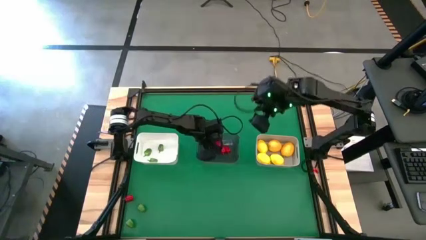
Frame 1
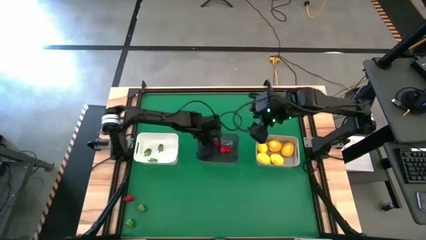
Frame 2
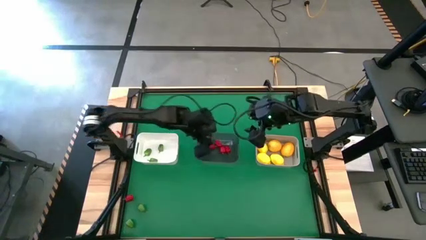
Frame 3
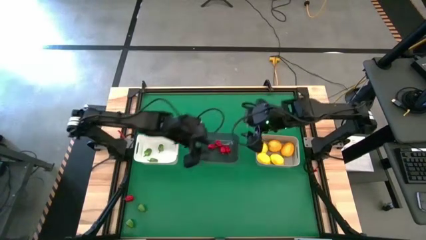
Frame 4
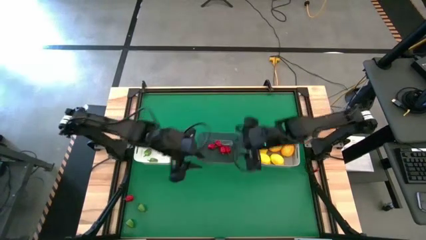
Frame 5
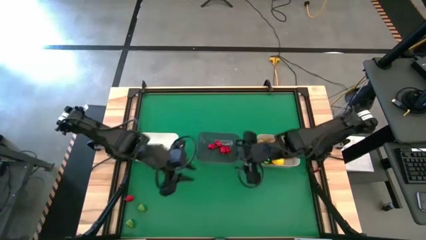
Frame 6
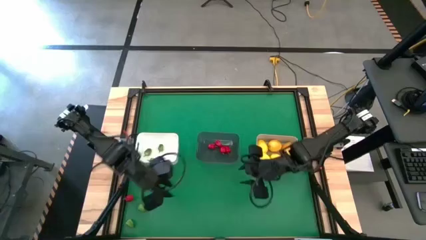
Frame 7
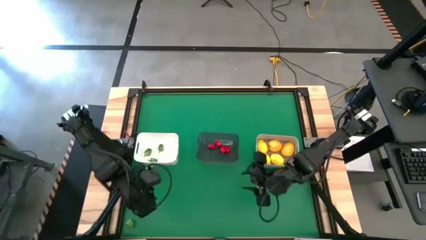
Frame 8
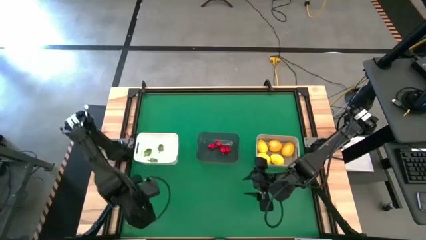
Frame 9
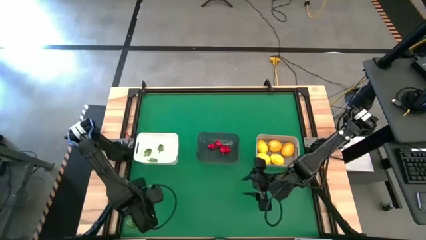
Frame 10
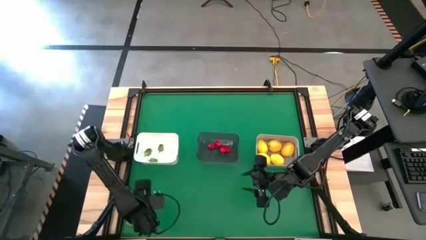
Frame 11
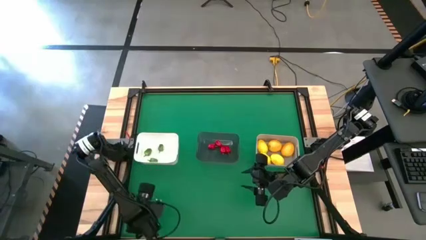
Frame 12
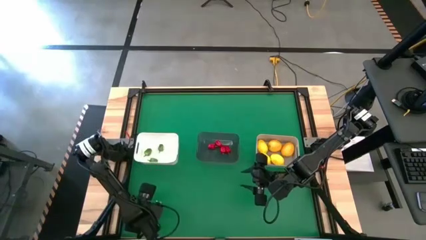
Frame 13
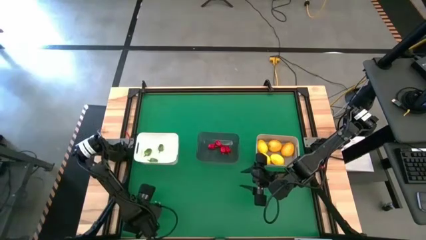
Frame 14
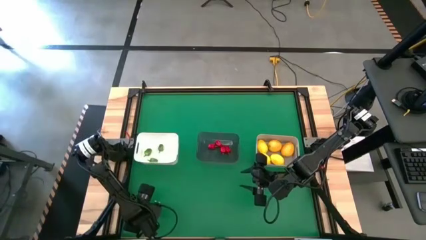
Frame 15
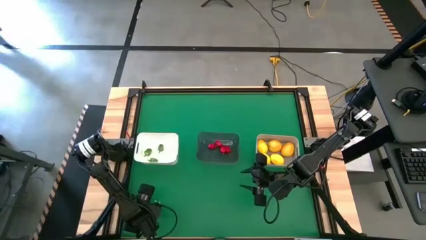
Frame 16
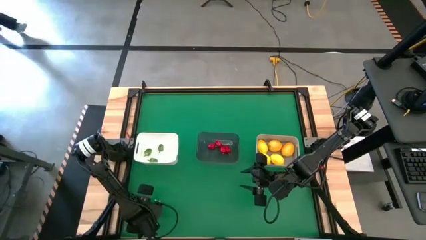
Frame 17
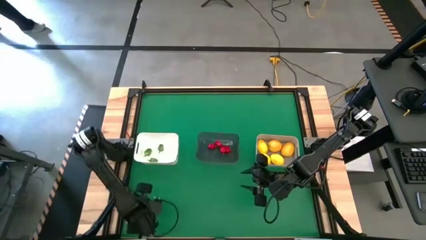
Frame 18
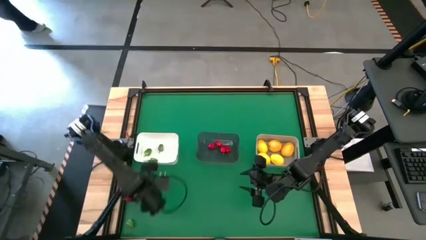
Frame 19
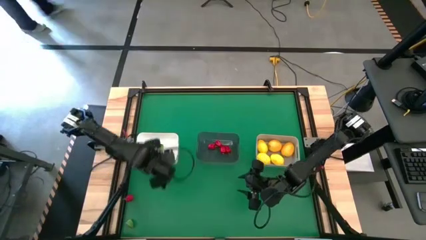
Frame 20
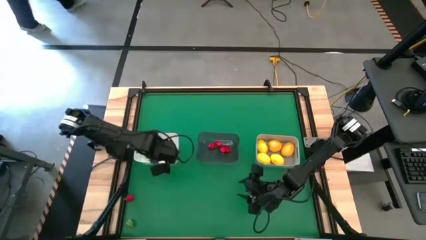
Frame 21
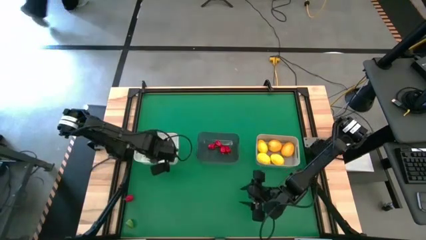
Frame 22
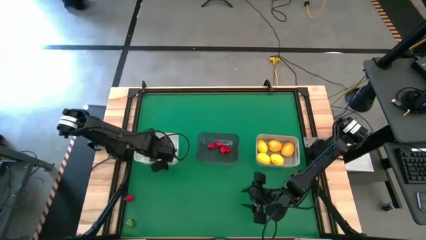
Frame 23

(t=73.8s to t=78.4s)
Task: Sort produce into baskets
Put the green chili pepper into the white bin

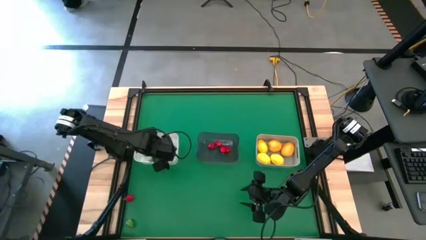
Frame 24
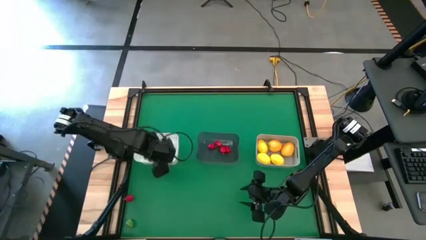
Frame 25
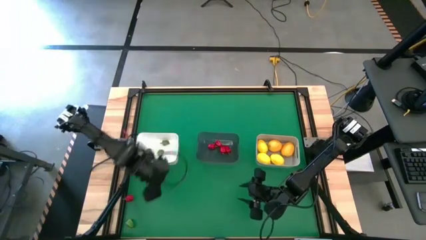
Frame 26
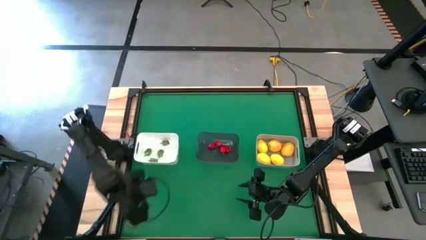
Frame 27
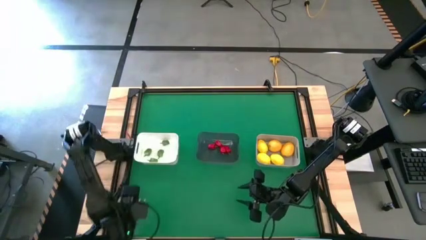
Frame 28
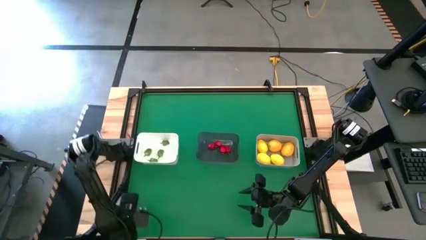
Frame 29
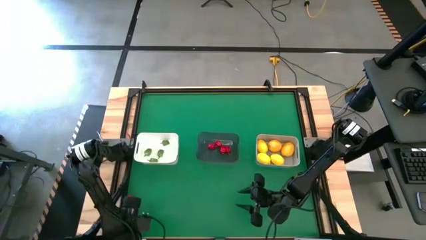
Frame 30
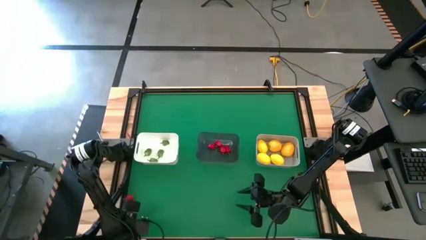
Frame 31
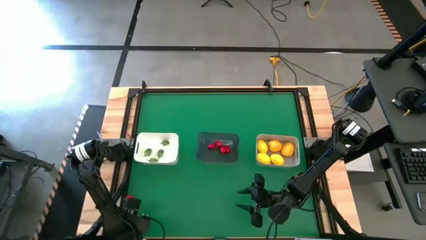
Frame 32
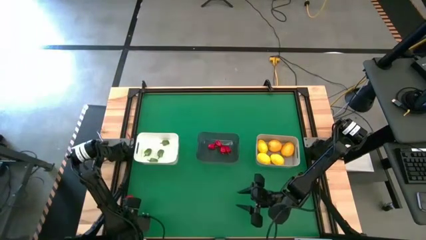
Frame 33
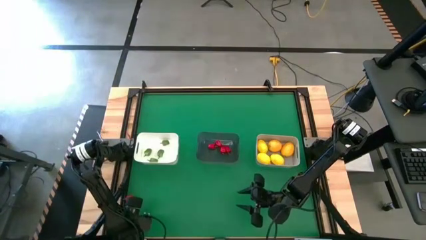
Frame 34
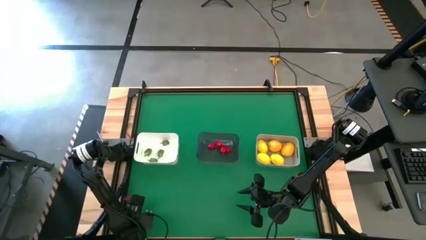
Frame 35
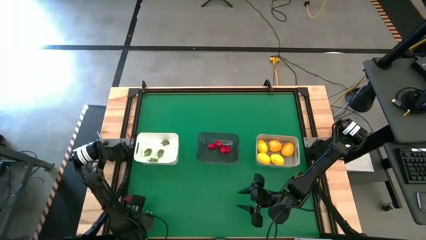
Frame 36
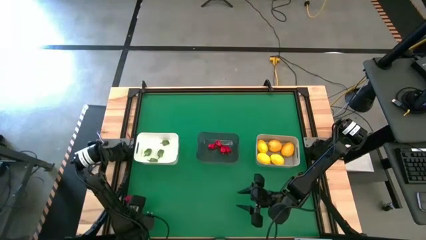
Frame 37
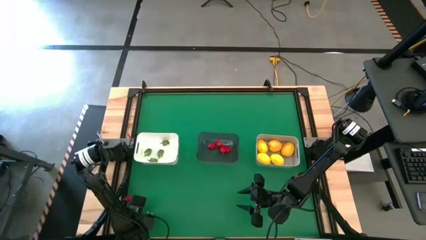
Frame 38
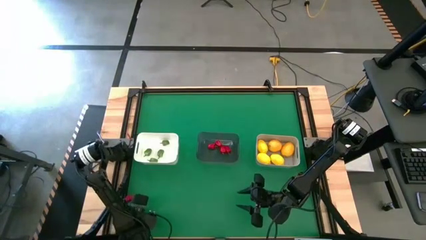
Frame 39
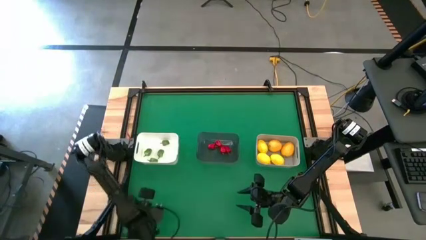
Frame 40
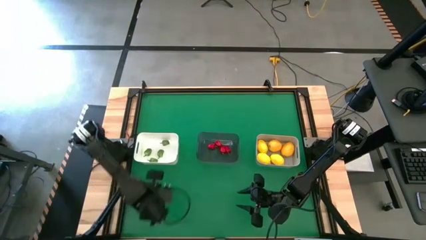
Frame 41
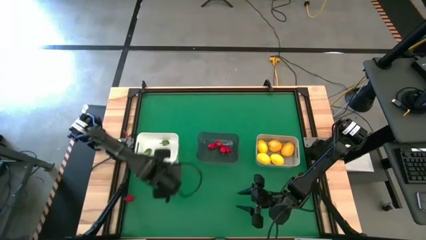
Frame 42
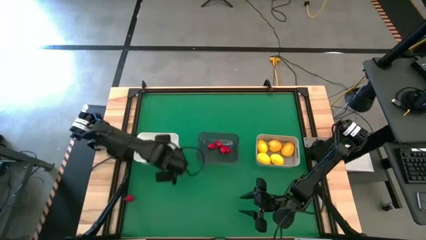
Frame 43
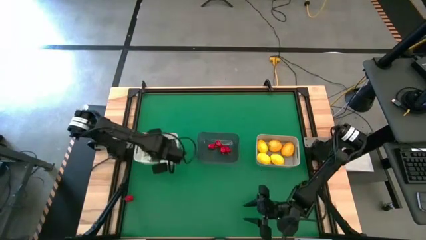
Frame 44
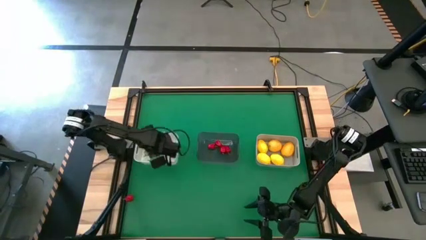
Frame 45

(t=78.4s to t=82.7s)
Put the green chili pepper into the white bin

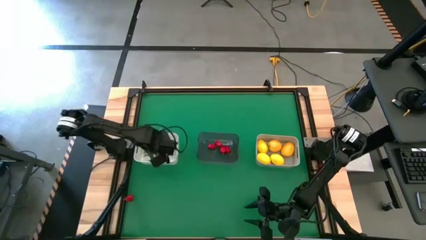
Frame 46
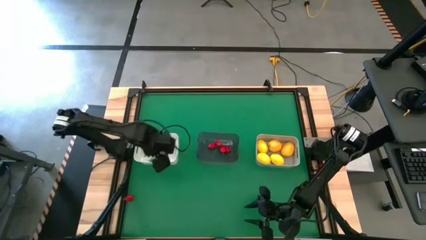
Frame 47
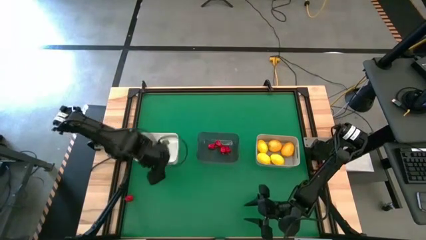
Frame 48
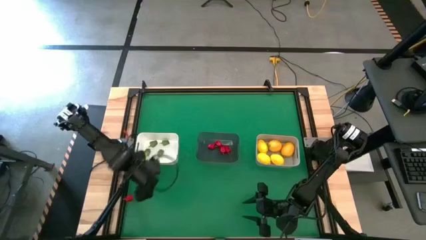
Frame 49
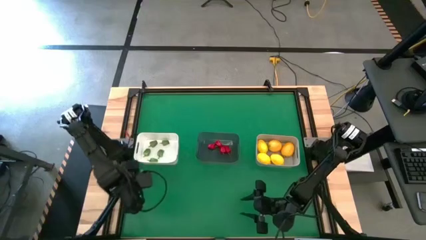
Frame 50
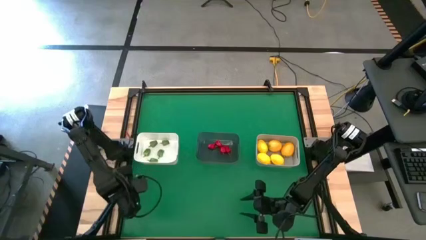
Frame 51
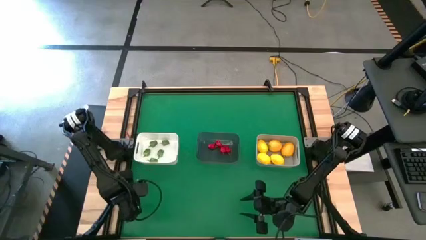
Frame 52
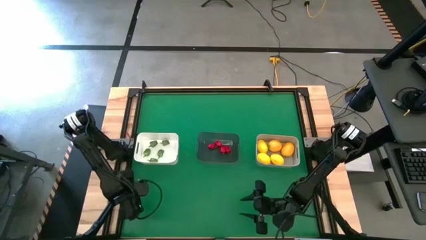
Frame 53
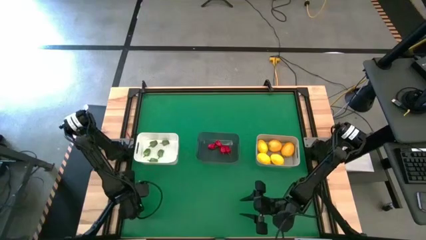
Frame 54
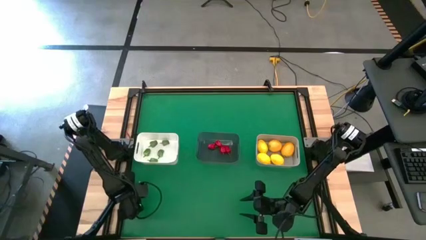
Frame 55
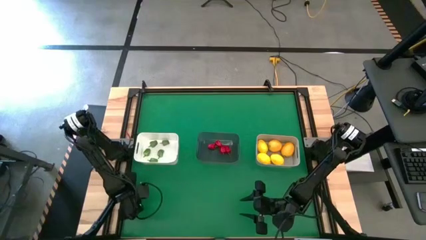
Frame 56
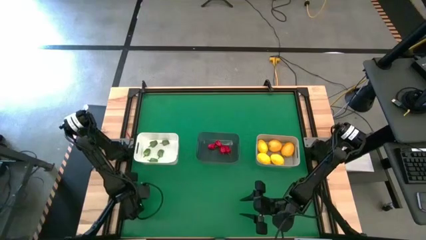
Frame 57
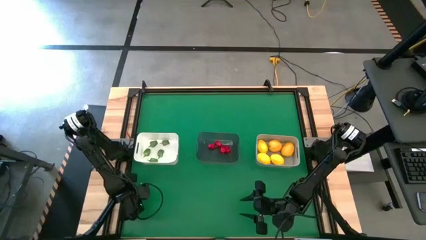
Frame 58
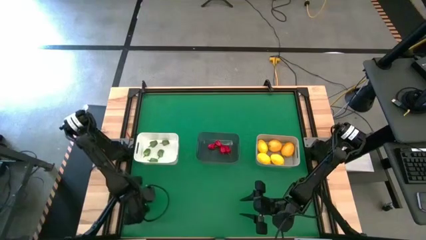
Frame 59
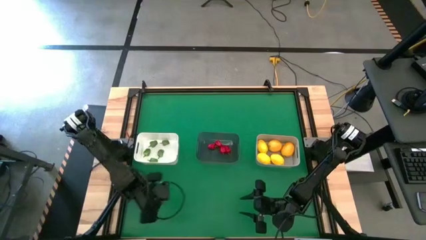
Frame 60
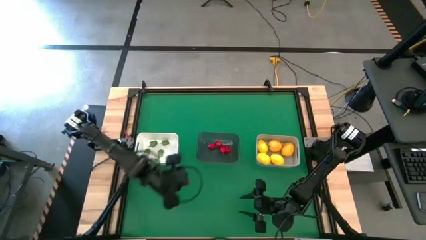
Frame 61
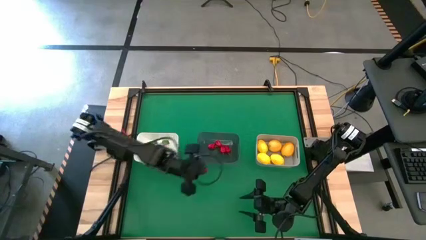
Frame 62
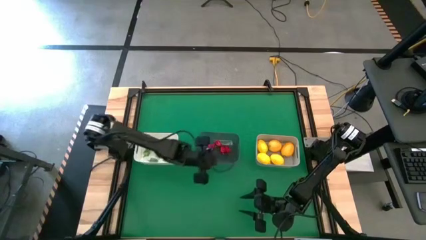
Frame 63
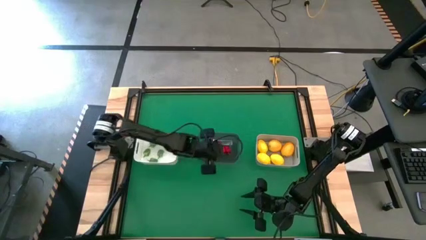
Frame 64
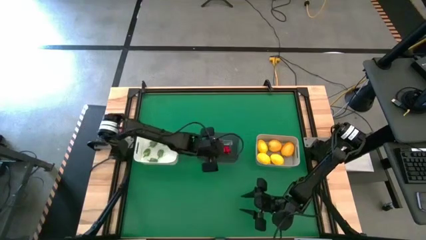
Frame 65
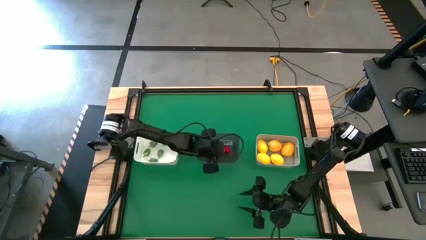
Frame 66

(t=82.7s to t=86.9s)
Put the red chili pepper into the black bin
